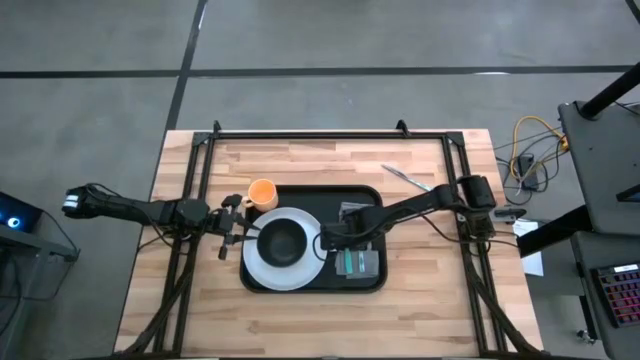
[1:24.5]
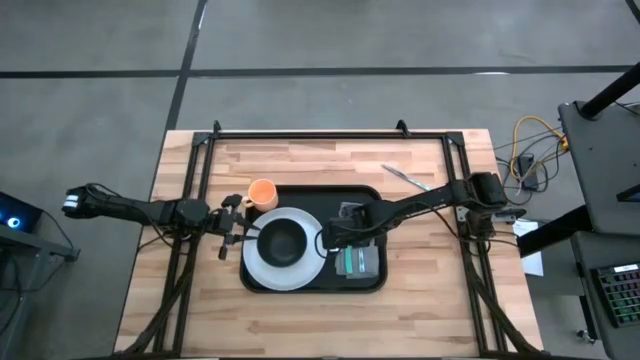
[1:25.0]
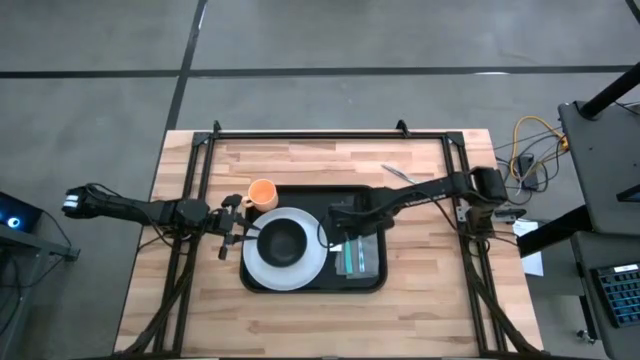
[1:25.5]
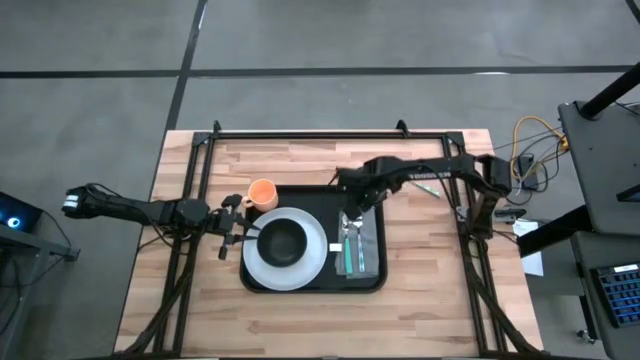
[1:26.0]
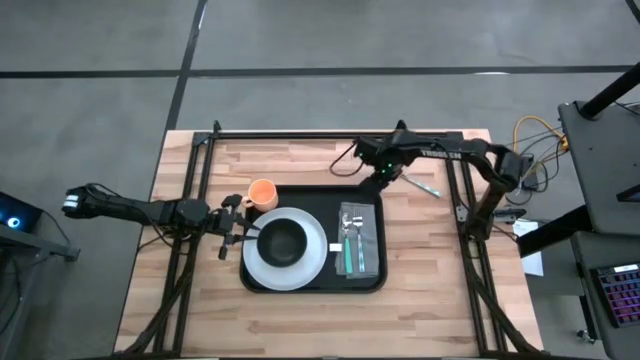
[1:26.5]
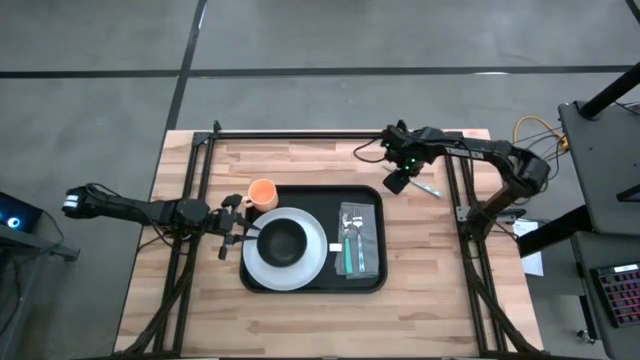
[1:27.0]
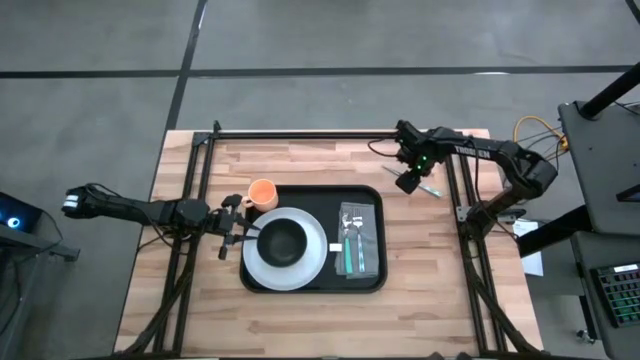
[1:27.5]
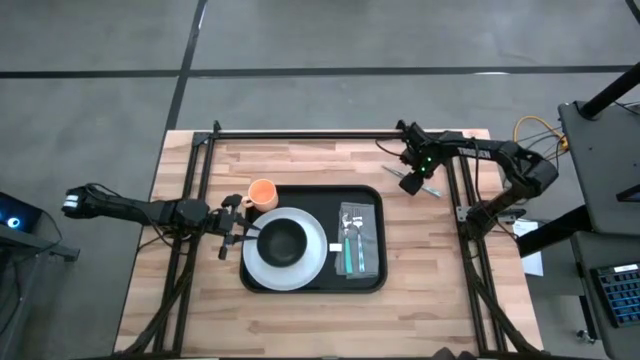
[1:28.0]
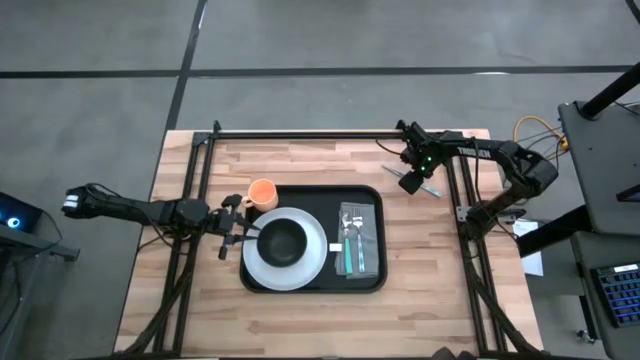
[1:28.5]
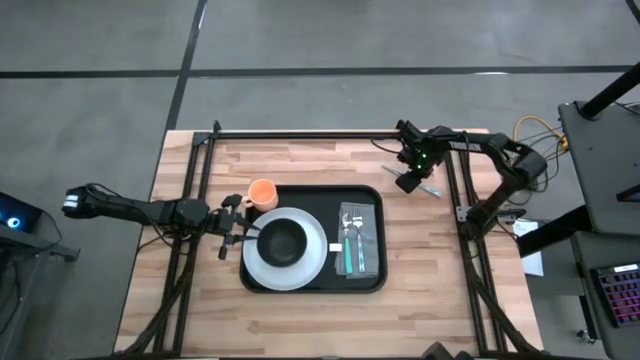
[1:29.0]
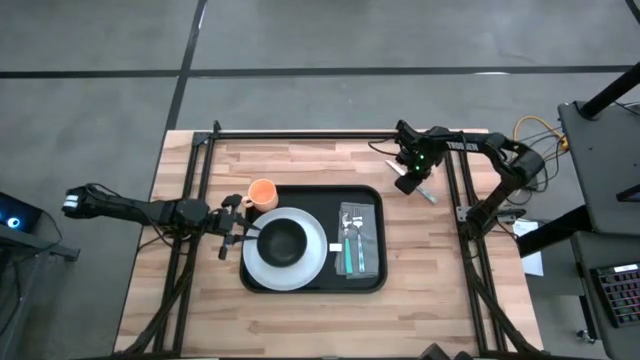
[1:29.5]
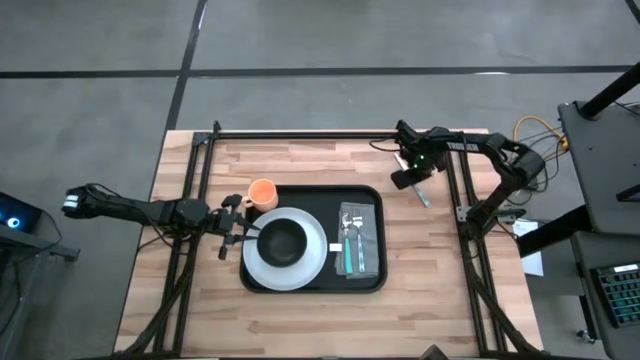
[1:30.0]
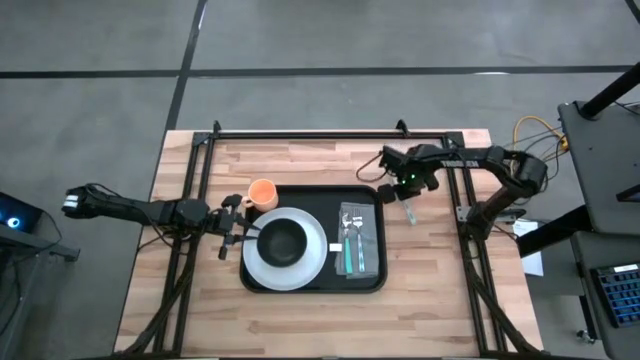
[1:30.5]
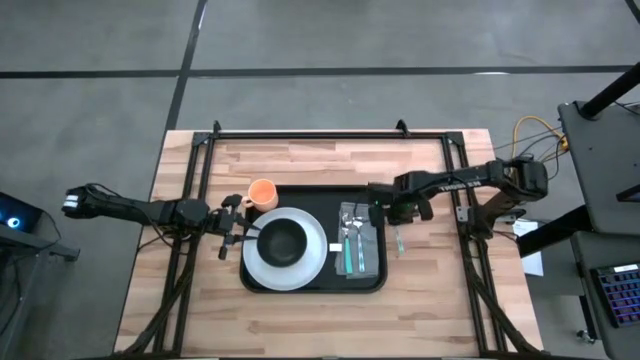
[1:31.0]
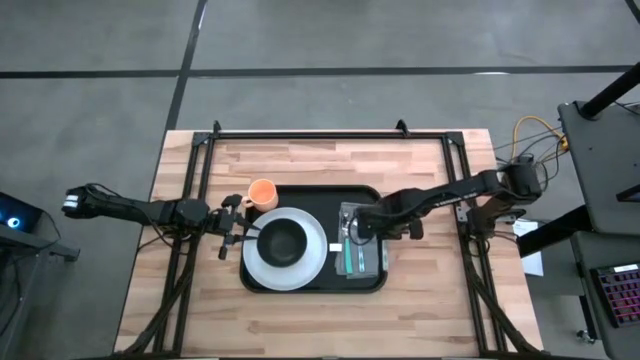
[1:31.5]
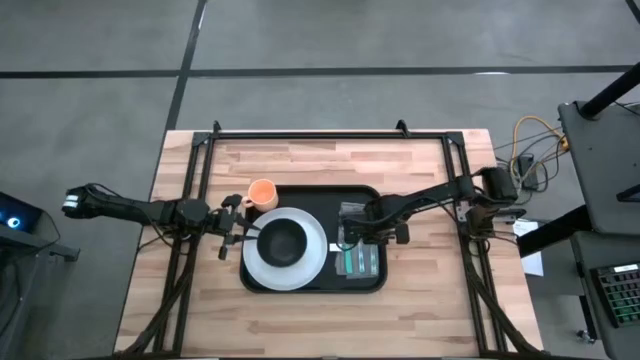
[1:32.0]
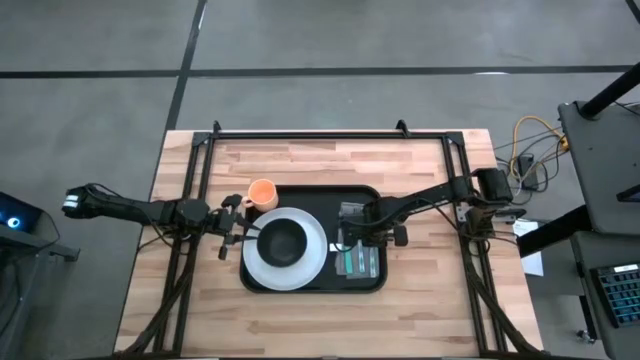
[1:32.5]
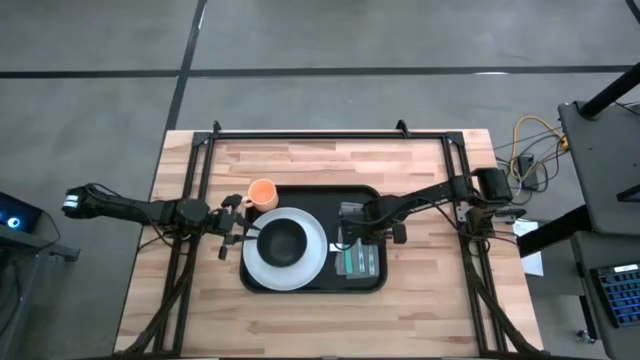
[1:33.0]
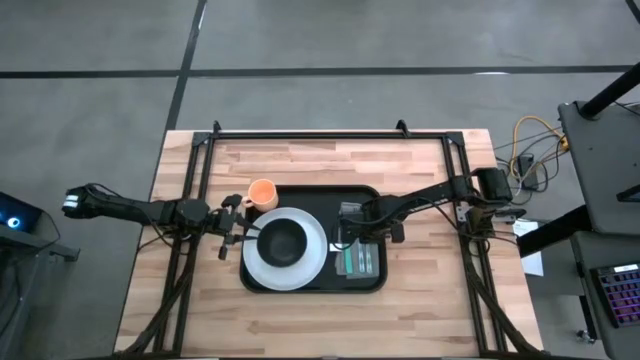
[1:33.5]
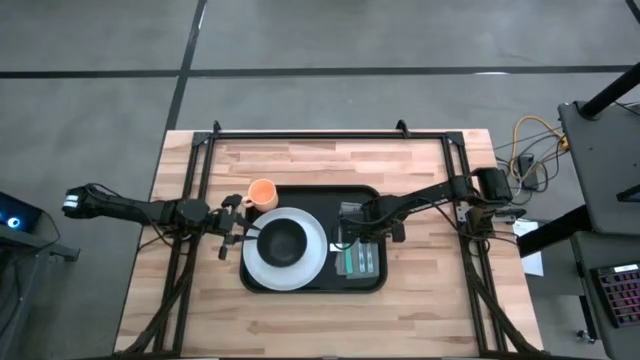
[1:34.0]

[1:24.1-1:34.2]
Task: Set up tray
Put the blue knife on top of the gray napkin

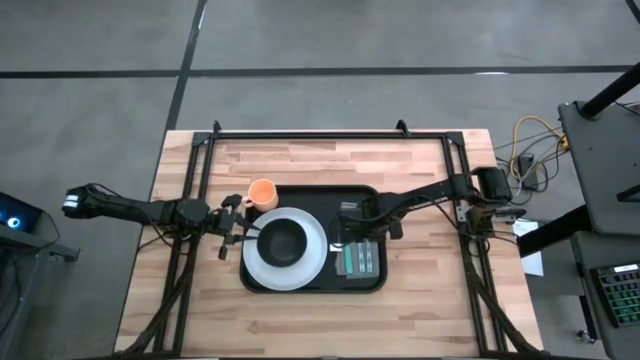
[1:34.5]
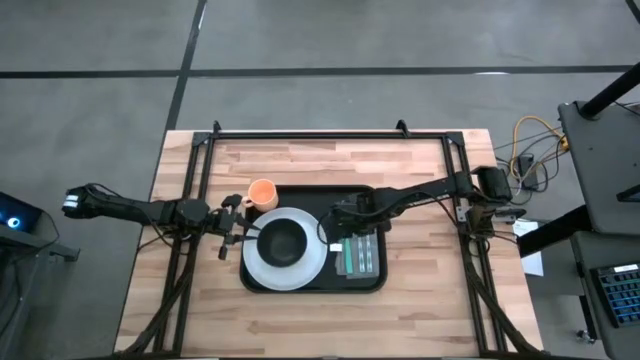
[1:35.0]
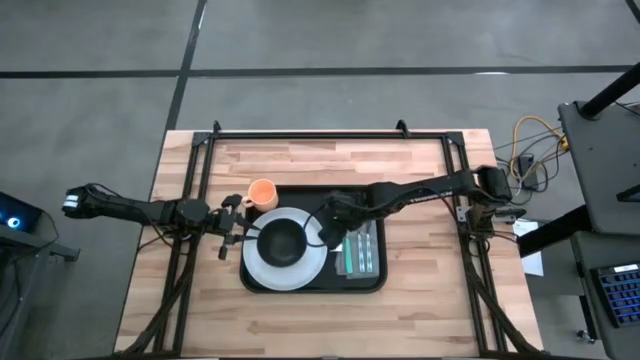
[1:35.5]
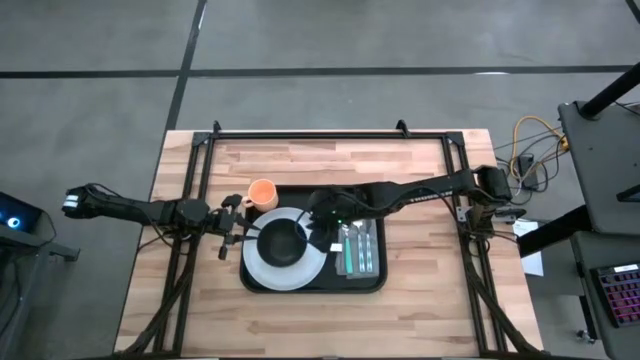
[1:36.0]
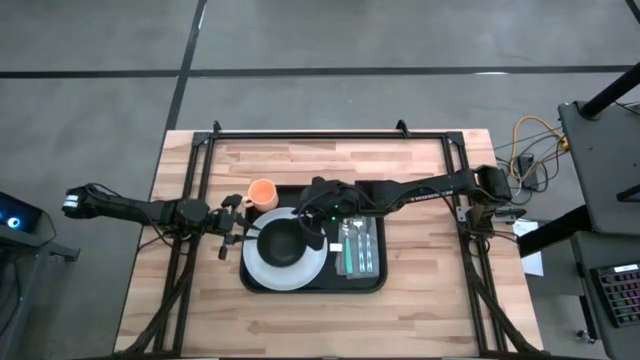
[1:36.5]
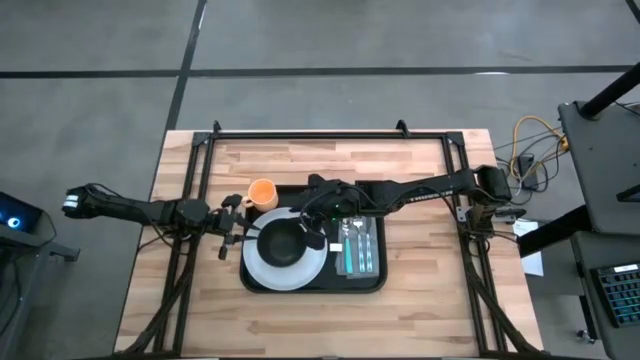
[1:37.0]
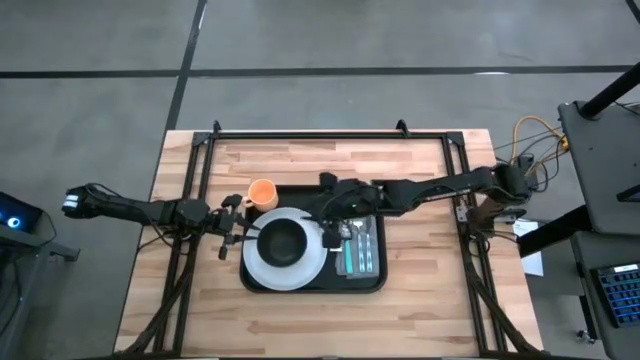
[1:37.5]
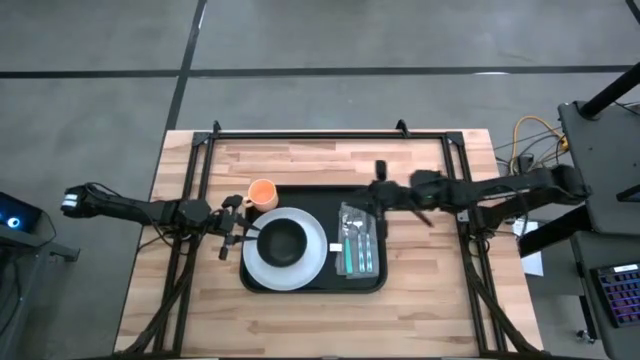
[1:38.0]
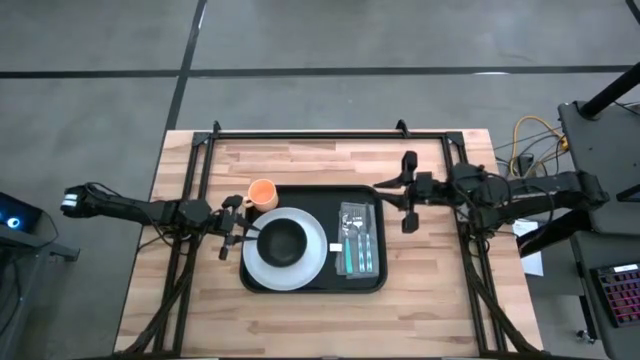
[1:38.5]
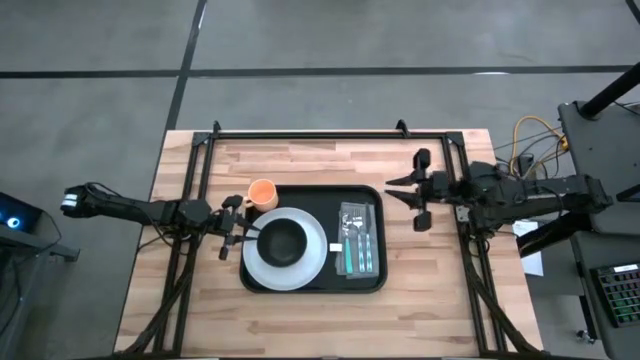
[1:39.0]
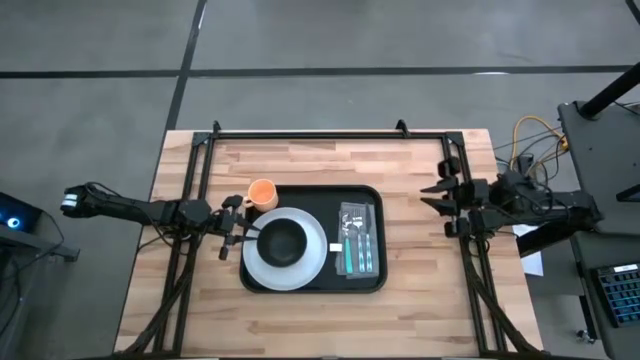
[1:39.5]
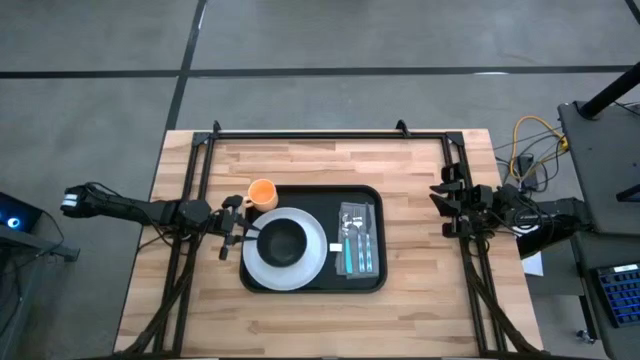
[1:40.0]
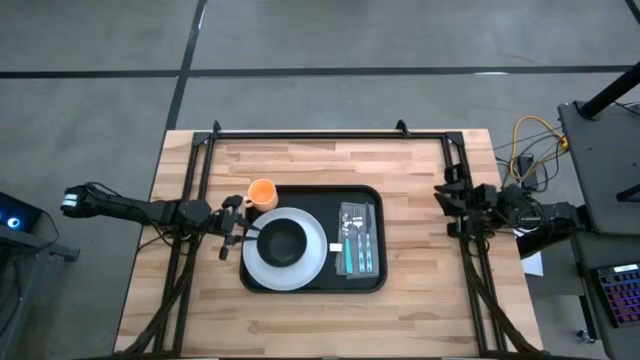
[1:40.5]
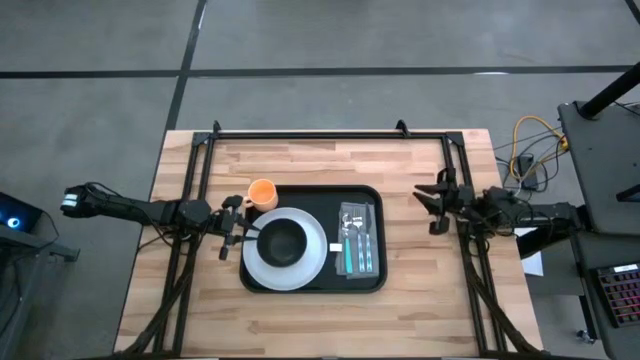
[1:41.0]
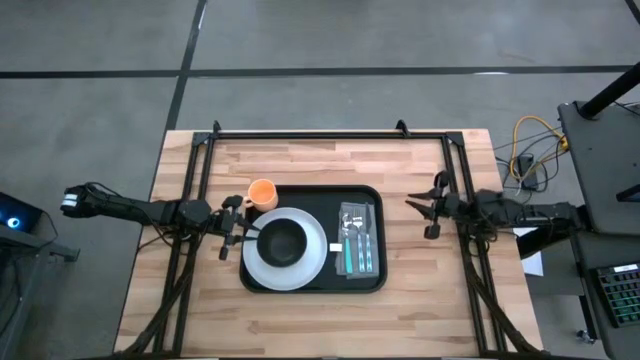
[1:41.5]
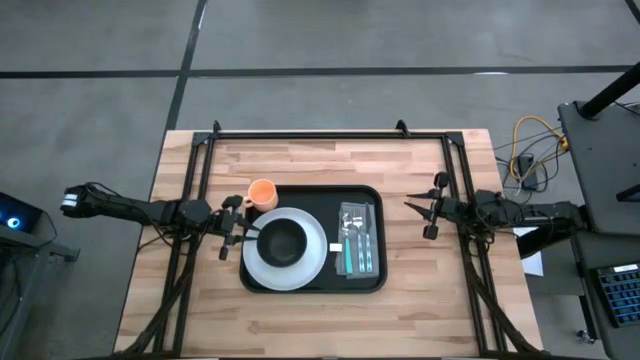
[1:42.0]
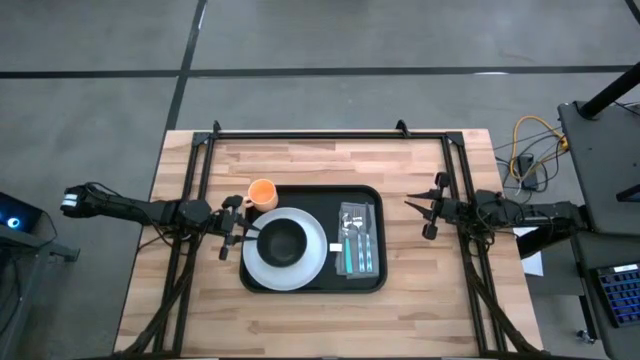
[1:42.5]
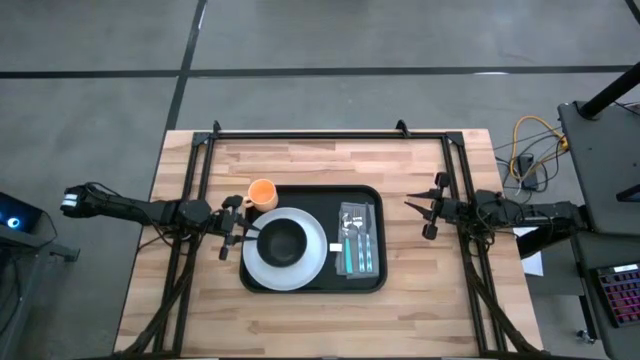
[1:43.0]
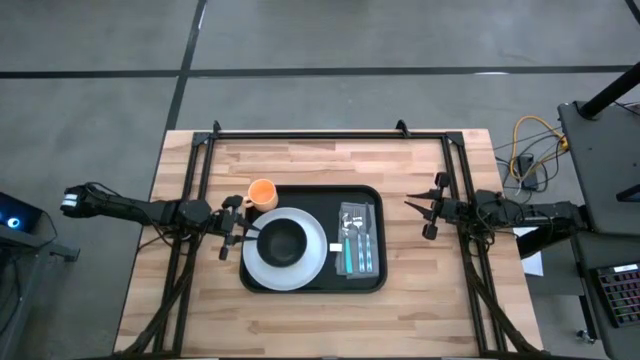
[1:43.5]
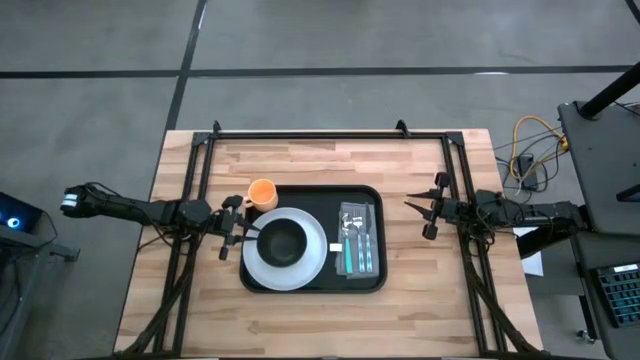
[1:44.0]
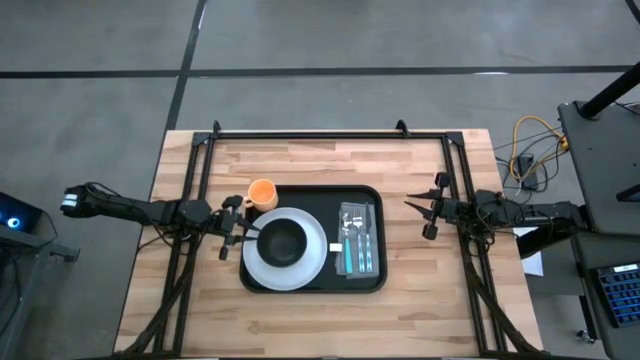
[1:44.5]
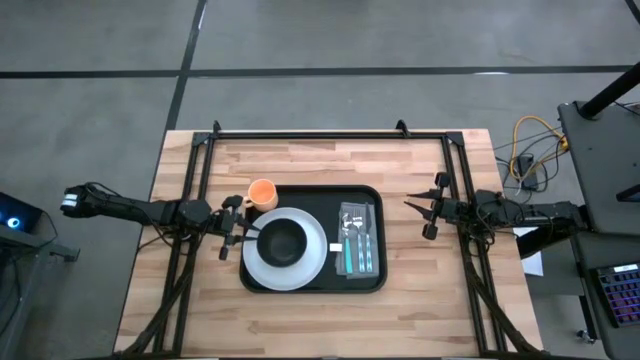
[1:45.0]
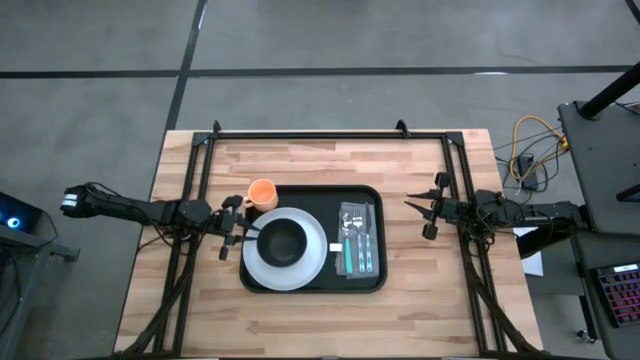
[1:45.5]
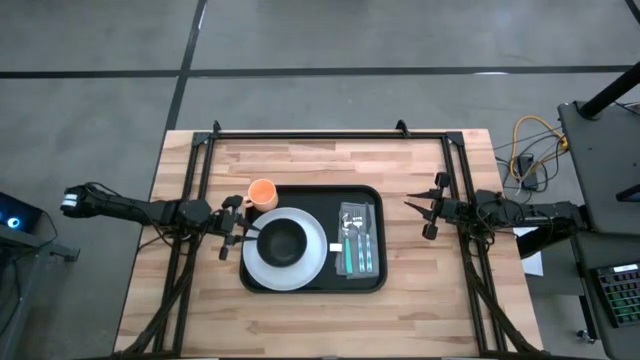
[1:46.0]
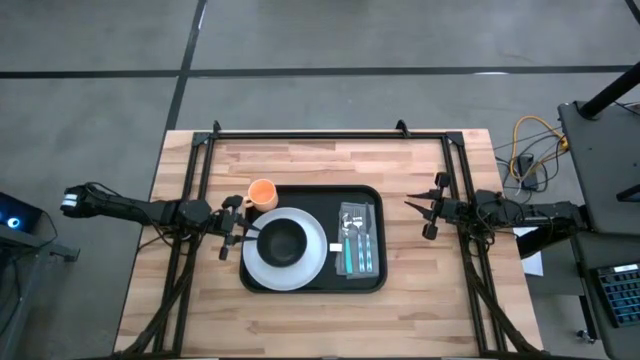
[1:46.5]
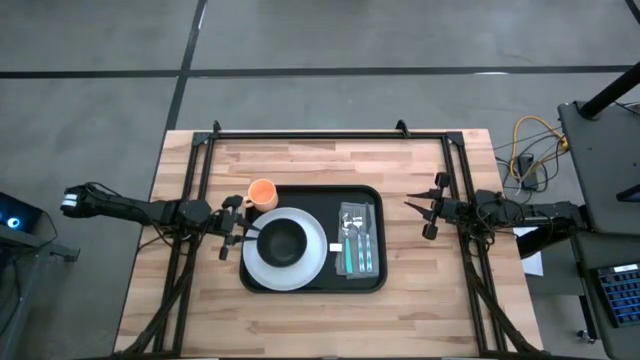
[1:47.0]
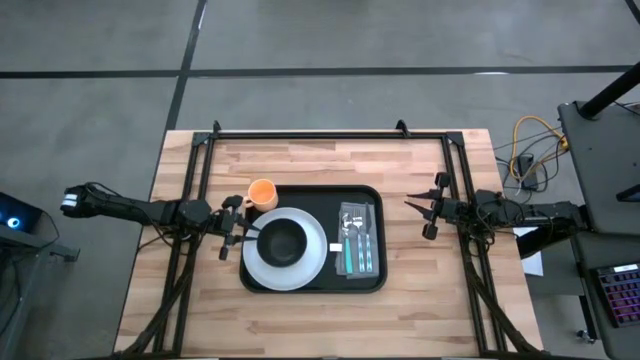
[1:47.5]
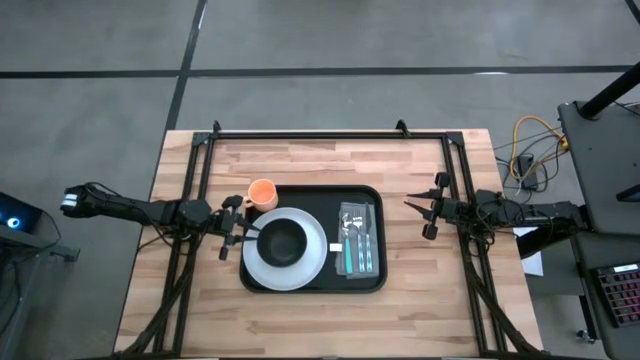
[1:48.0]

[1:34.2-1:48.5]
Return to Home Position
